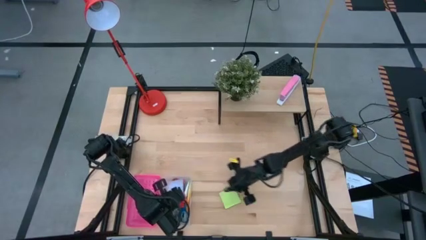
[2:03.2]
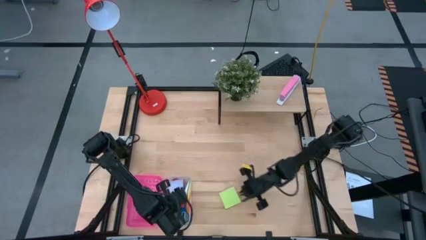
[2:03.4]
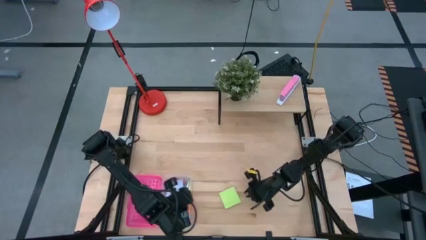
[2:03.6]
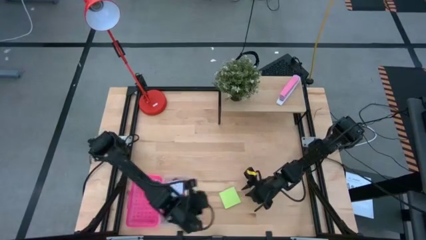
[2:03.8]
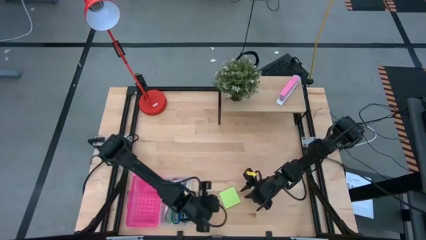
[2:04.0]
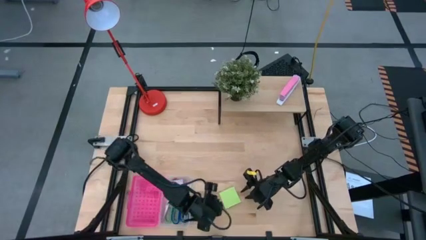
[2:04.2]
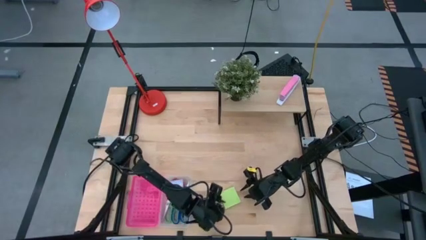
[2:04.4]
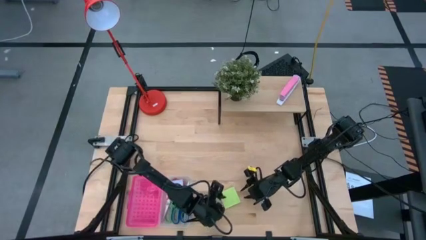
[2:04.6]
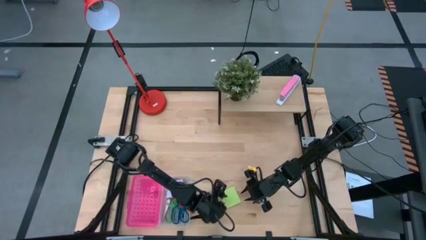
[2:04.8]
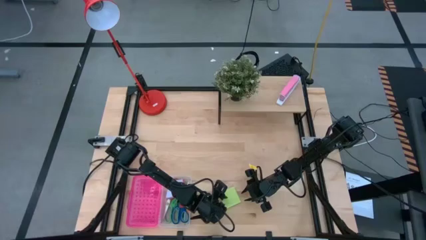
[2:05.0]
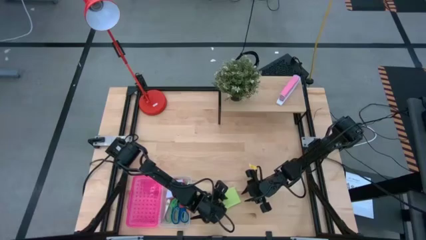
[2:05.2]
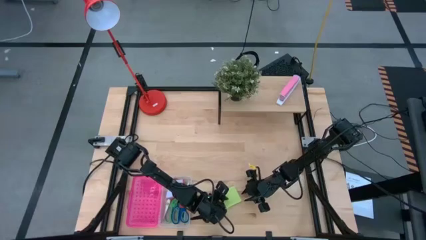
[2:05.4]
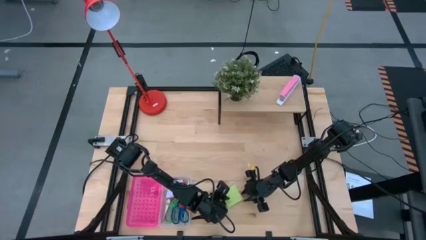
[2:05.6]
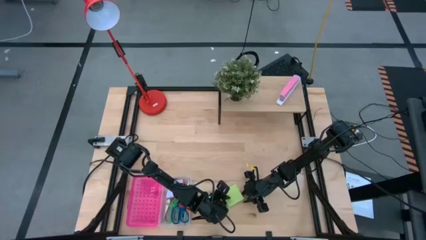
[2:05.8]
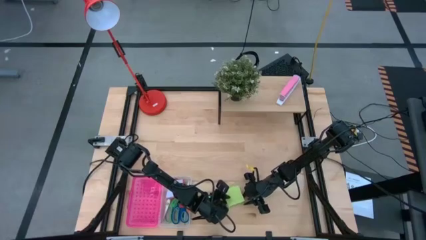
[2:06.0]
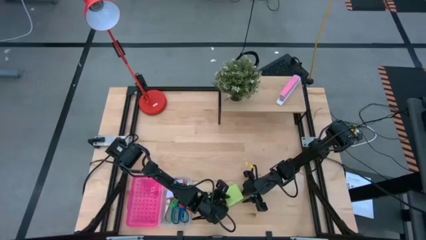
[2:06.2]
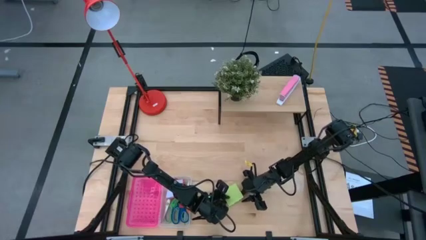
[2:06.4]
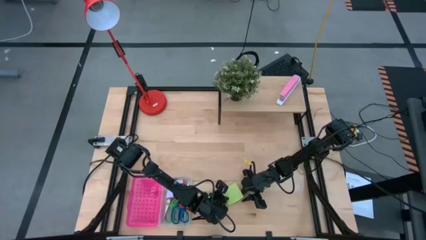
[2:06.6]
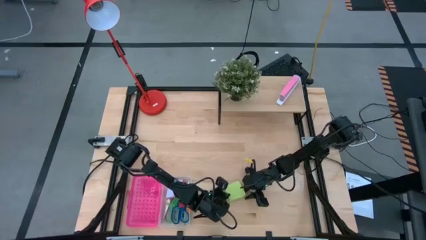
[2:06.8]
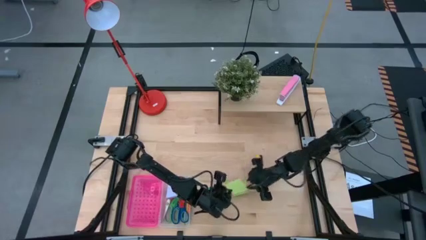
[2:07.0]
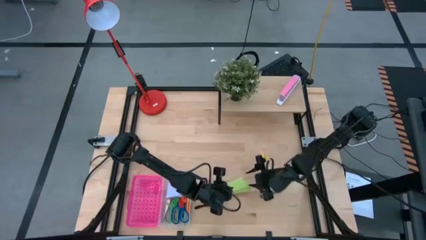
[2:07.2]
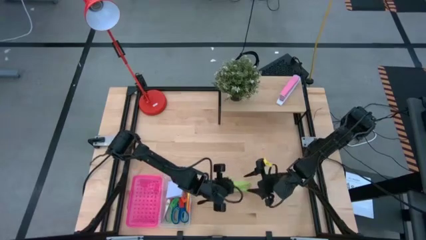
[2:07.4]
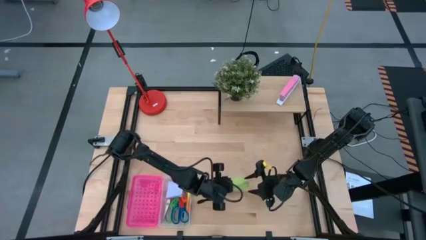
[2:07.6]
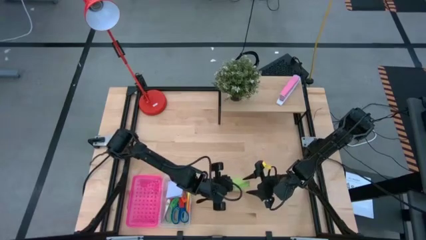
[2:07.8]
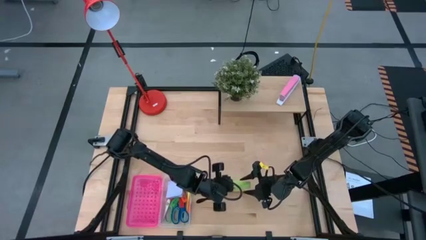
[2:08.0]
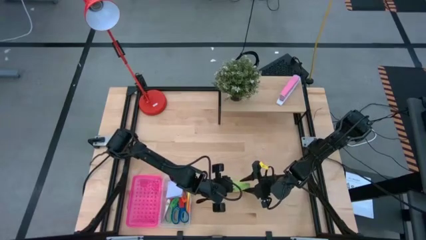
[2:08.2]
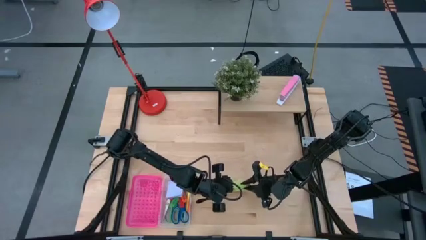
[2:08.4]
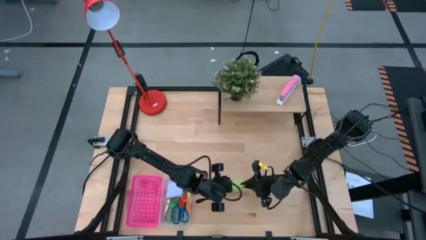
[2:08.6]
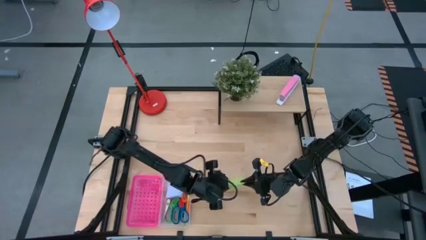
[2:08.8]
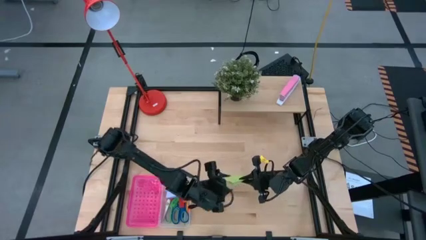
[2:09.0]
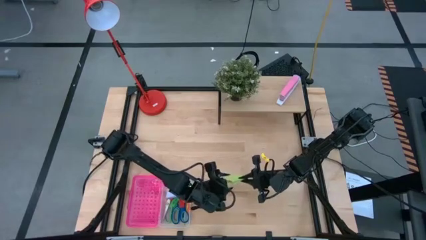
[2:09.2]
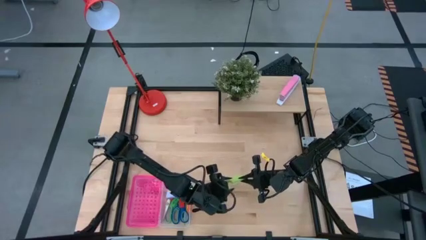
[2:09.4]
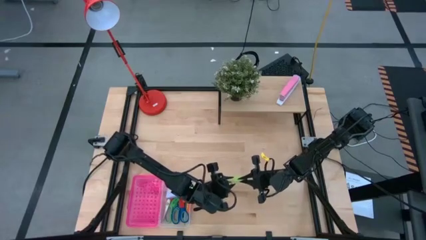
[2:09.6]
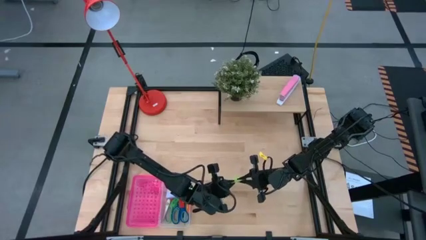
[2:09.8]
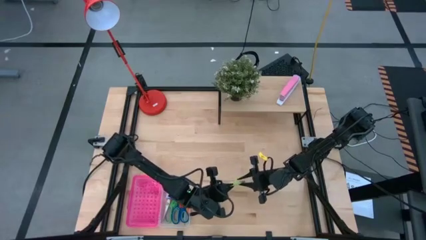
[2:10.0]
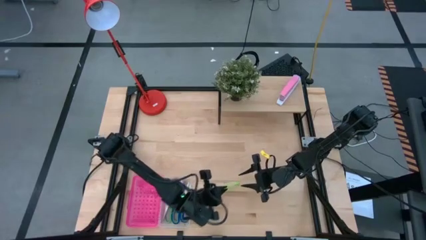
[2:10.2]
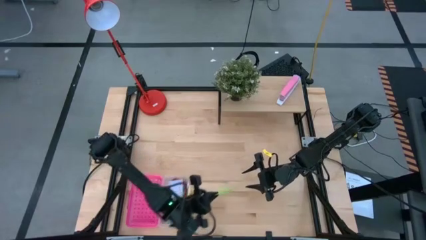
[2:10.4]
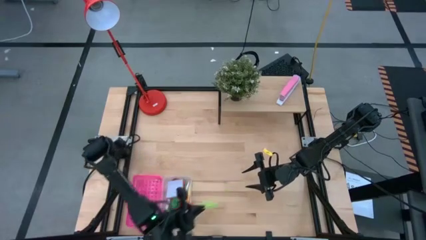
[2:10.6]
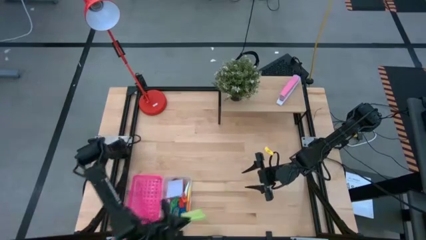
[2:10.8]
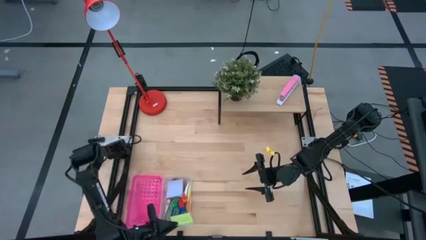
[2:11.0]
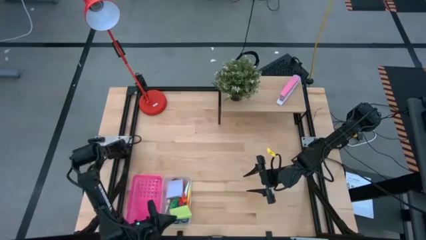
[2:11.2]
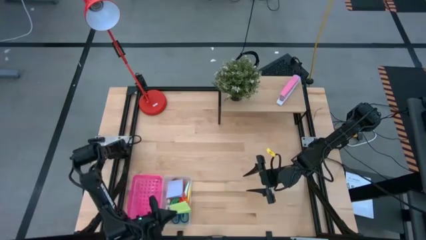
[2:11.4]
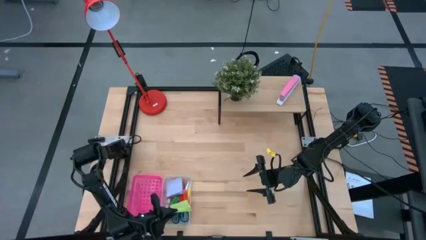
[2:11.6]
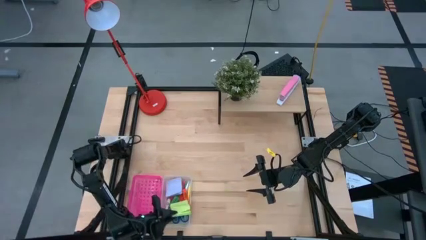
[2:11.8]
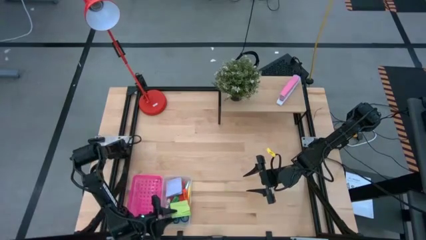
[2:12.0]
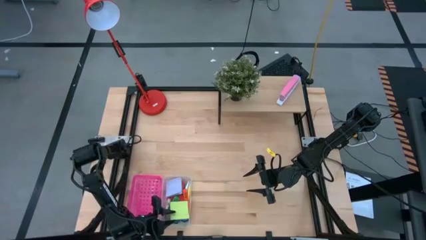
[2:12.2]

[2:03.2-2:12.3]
Task: Pack school essentials
Put the light green sticky notepad into the pink supply box

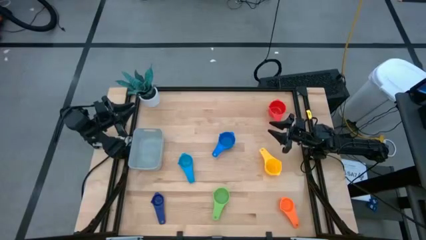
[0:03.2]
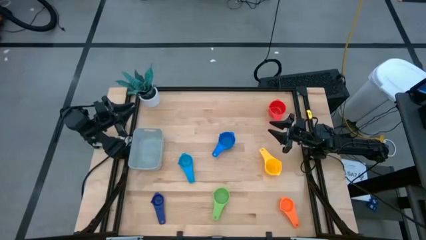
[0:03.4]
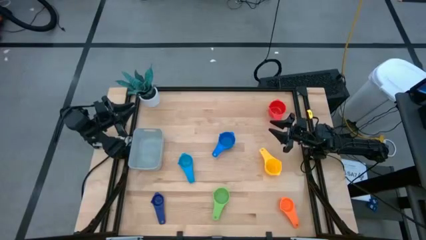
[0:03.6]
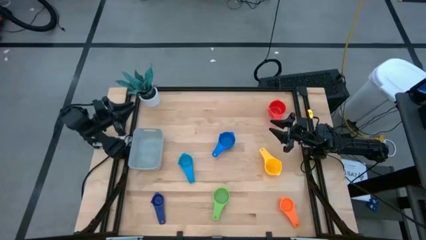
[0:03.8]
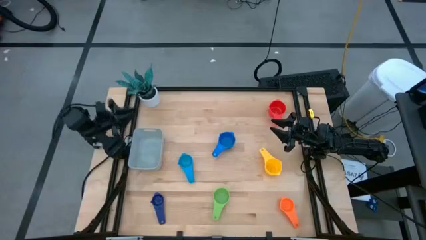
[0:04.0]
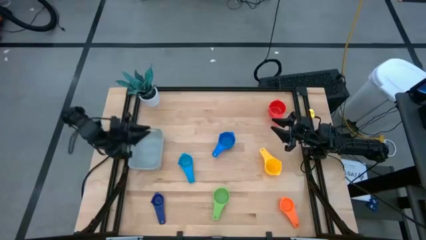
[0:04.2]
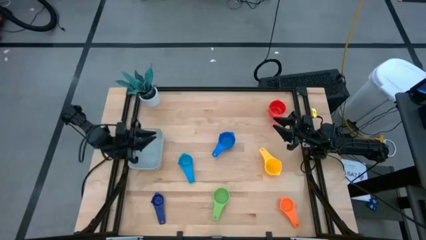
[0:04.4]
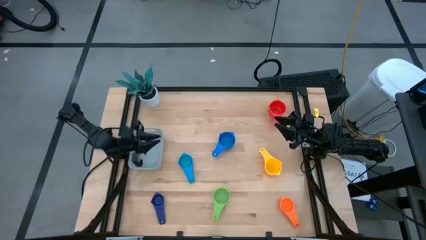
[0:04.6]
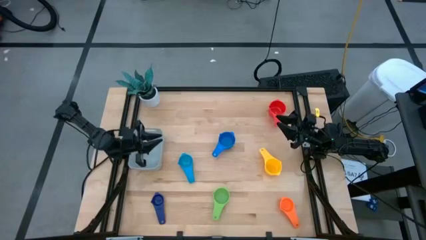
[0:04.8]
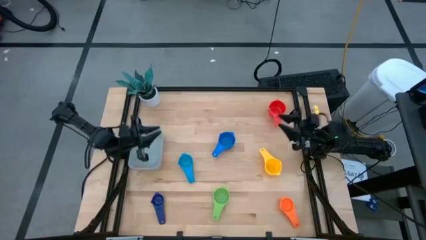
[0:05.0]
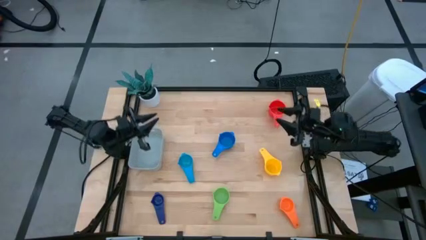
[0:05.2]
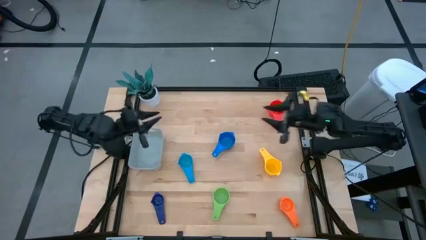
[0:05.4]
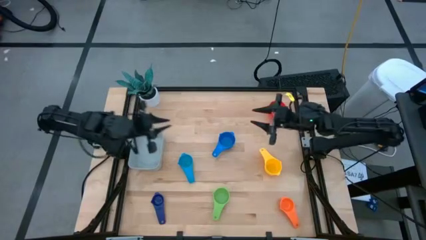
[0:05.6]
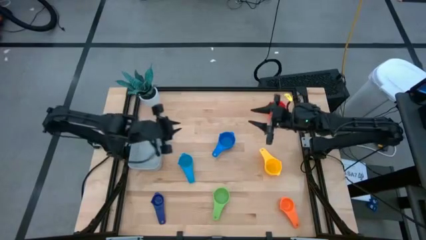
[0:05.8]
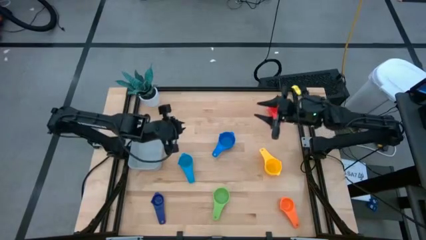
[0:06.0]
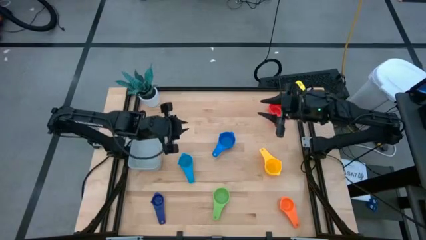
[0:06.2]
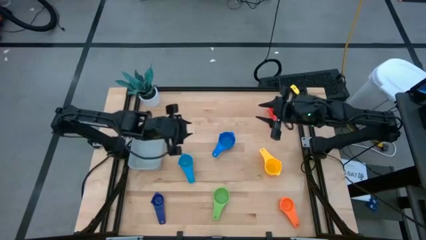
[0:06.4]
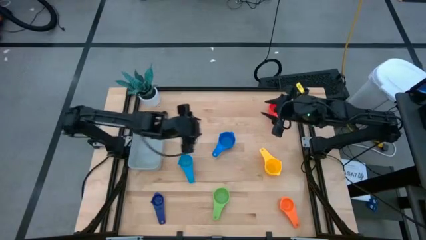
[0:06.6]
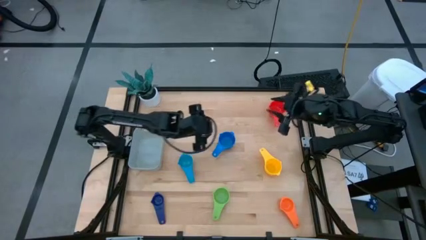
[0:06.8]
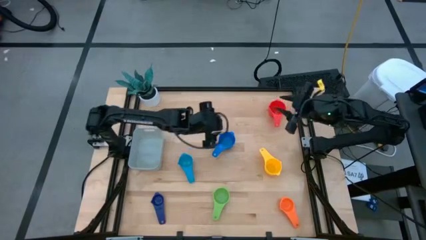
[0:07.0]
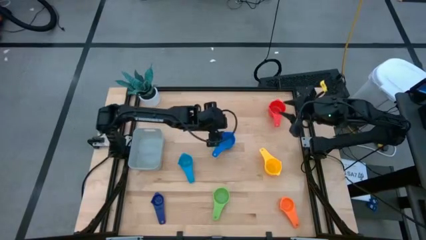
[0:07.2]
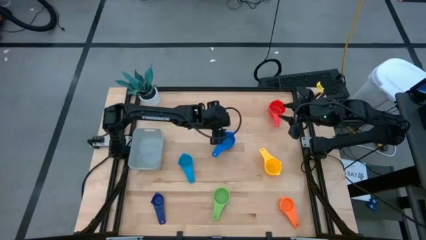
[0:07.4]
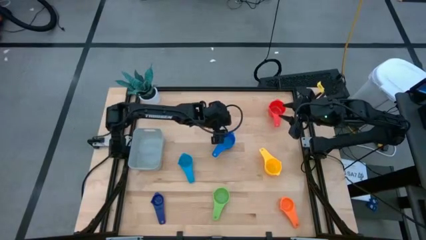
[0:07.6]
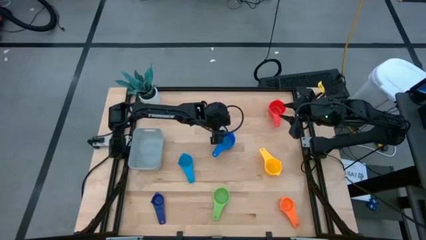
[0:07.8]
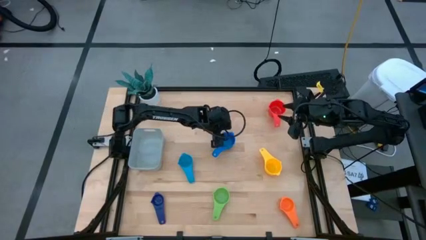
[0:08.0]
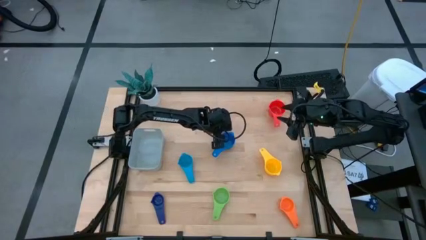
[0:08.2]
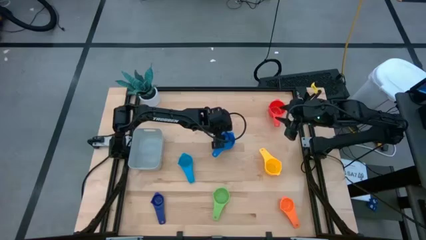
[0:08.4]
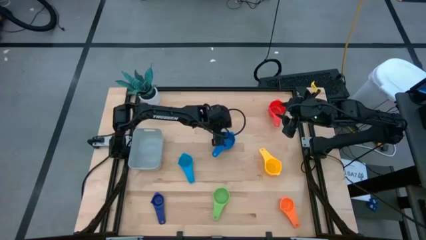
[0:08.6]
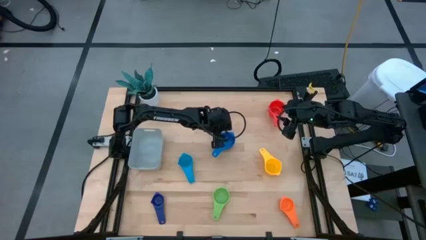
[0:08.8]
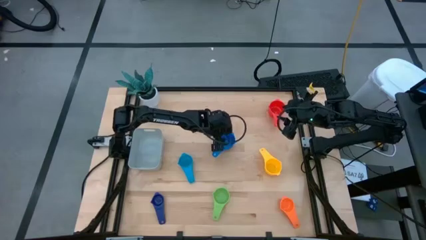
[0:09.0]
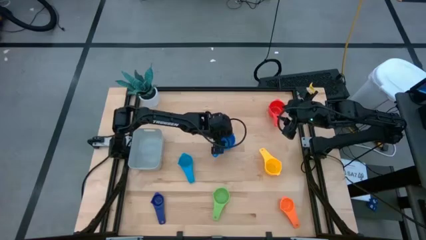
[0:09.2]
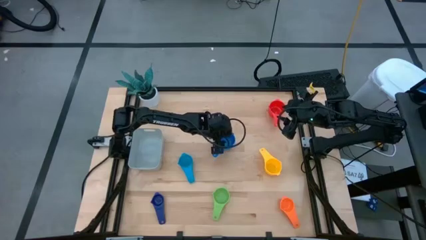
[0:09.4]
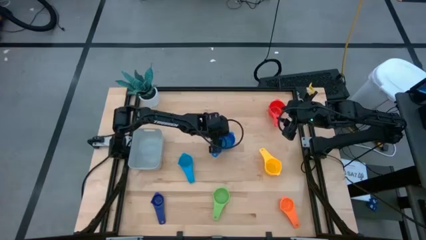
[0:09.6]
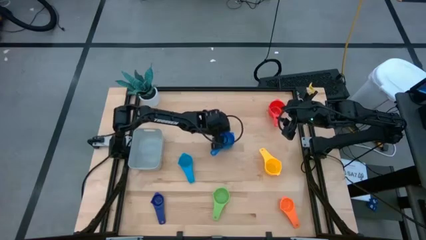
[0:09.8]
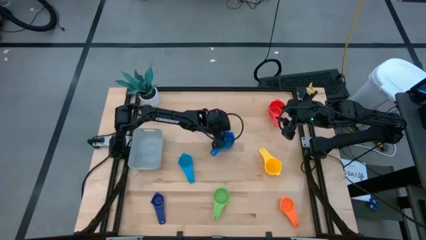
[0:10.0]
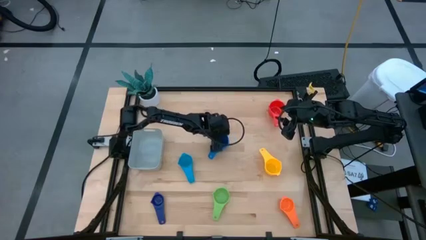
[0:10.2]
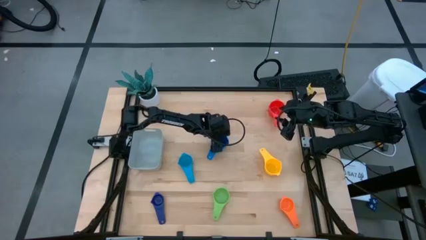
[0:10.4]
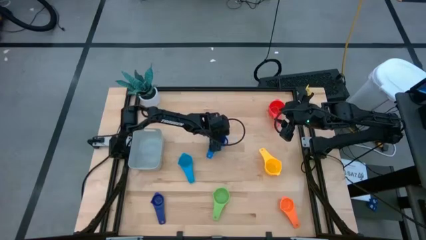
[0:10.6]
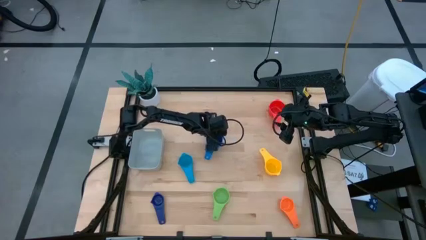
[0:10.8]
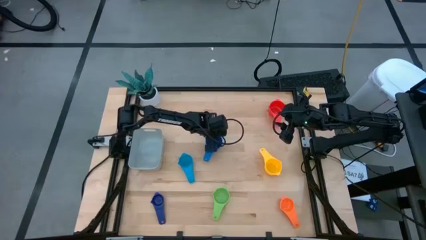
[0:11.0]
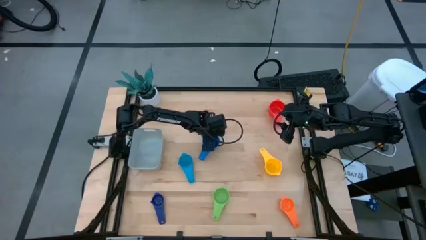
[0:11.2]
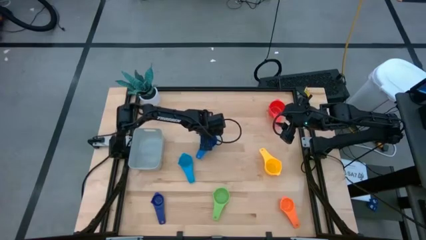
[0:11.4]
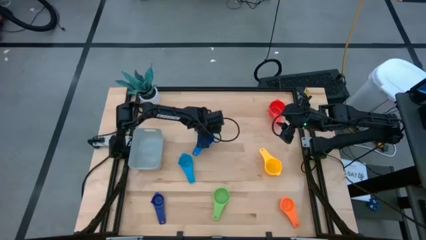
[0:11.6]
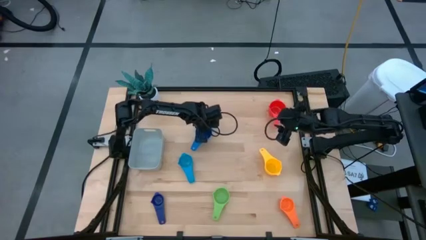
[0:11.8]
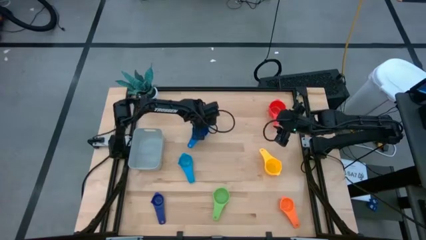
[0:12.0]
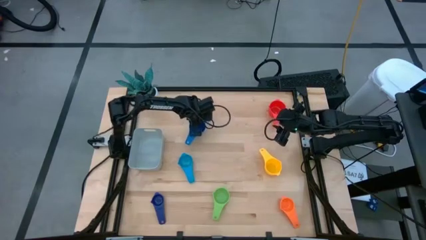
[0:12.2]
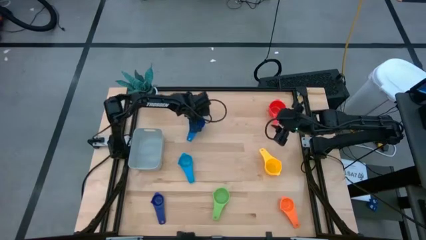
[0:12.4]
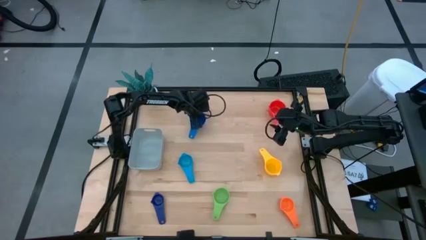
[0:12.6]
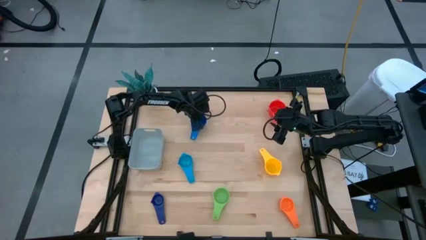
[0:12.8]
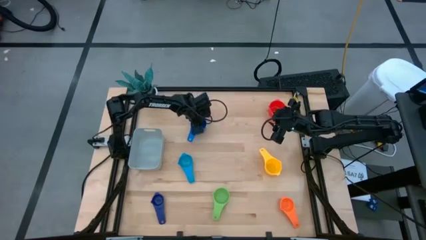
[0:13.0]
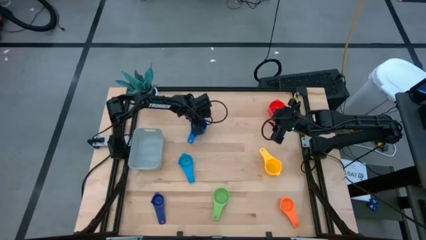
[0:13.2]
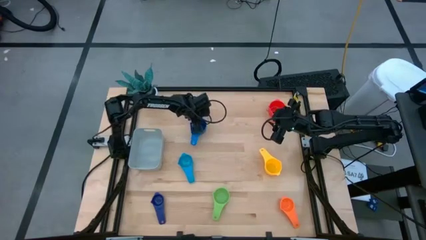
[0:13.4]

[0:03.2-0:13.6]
Task: Nest measuring cups in basket
Move the top light blue measuring cup to the top left of the table
